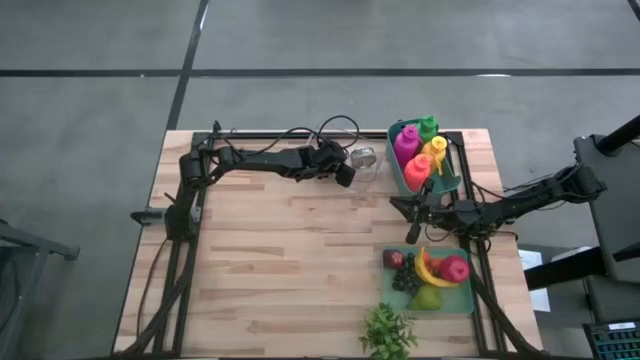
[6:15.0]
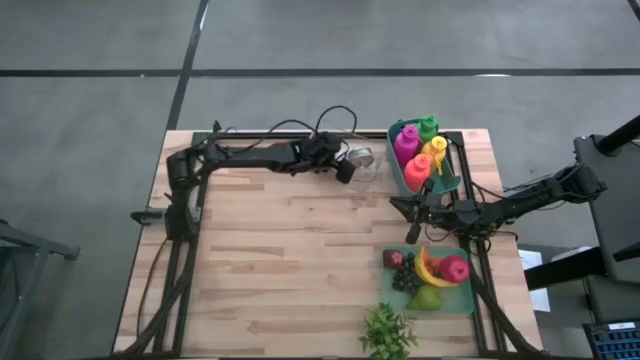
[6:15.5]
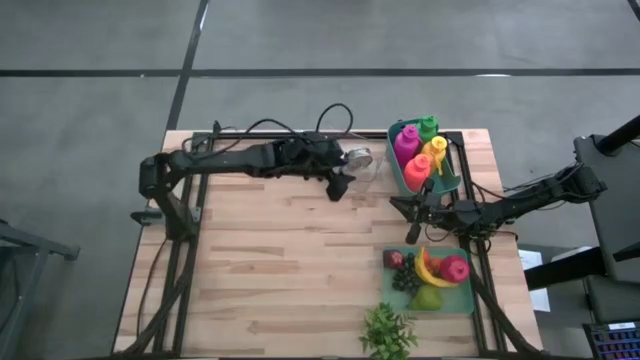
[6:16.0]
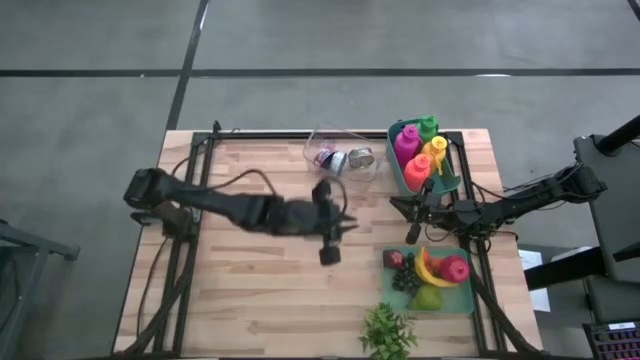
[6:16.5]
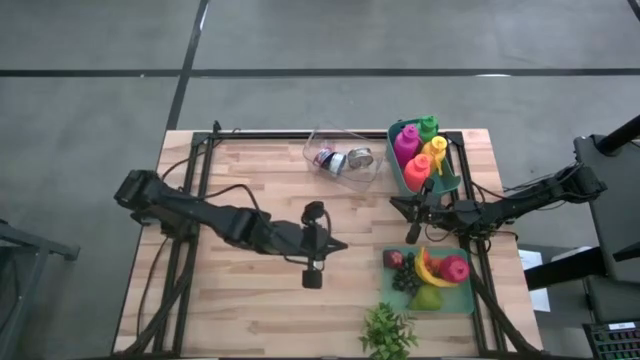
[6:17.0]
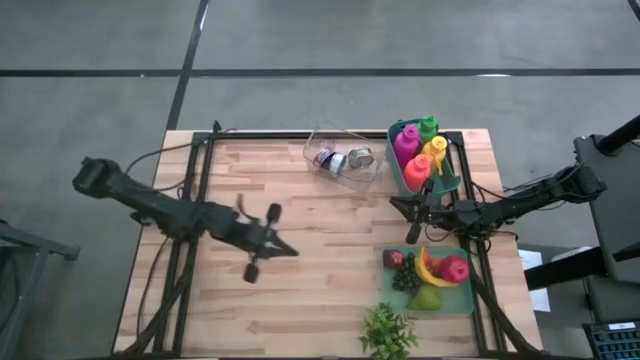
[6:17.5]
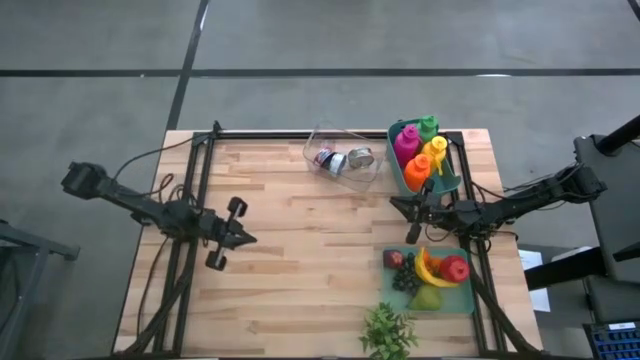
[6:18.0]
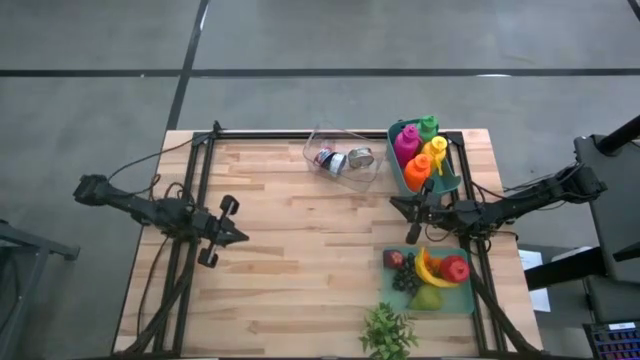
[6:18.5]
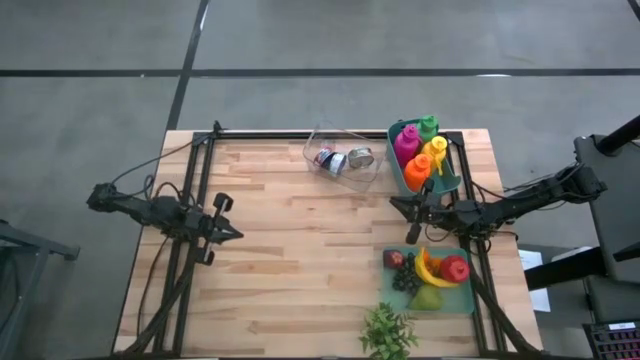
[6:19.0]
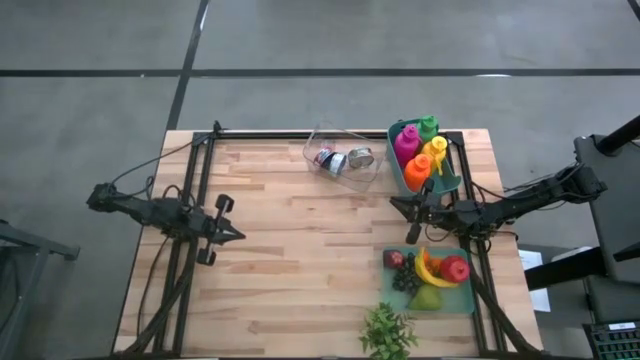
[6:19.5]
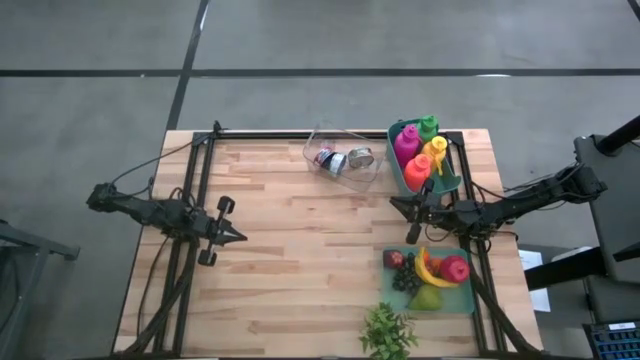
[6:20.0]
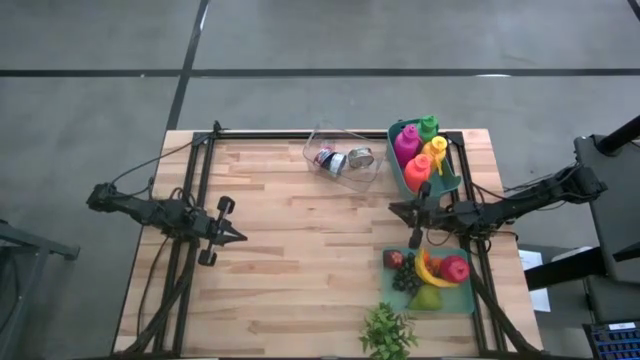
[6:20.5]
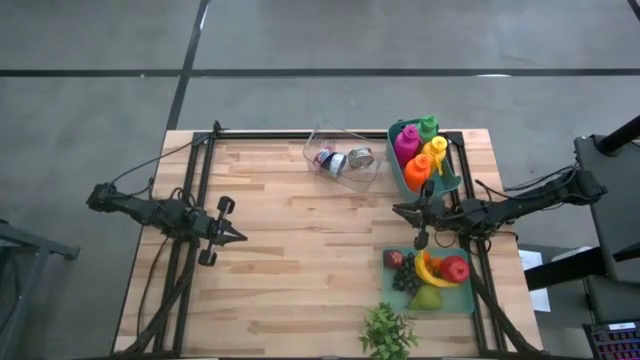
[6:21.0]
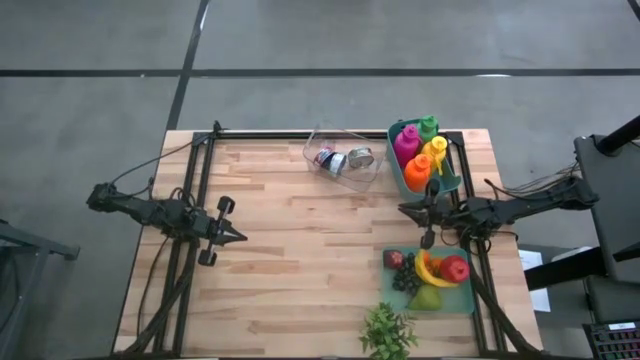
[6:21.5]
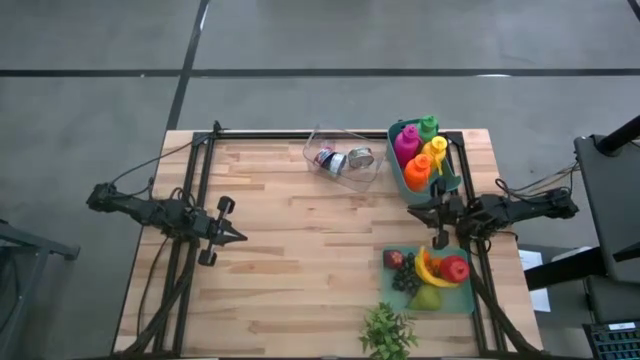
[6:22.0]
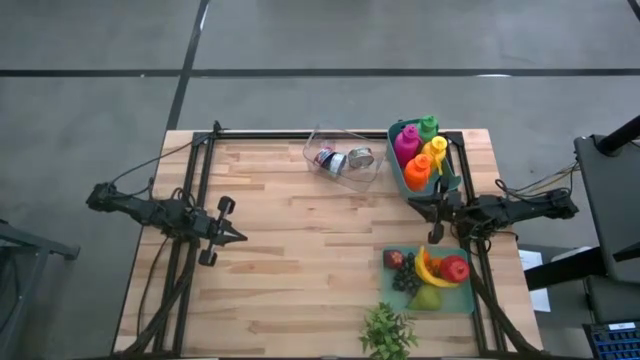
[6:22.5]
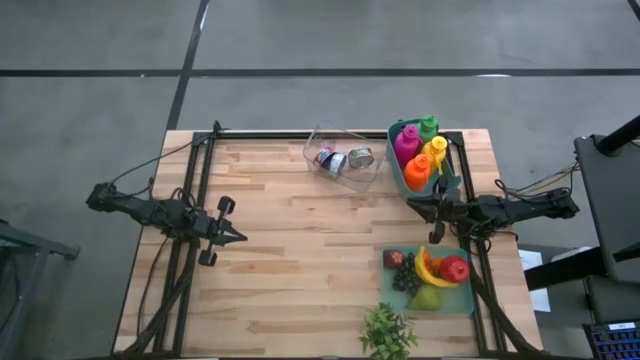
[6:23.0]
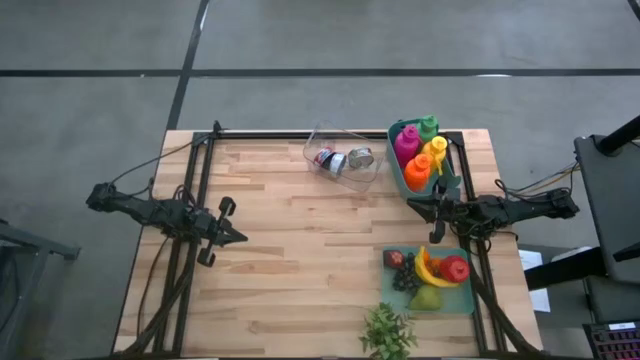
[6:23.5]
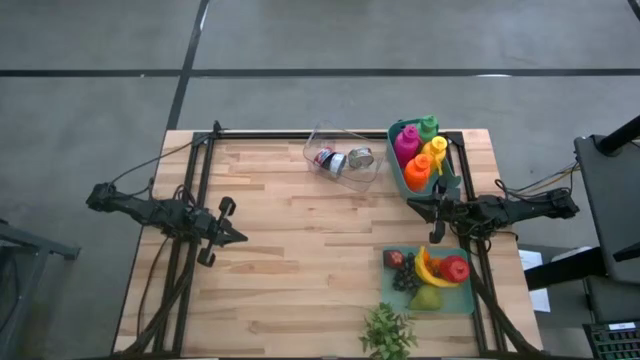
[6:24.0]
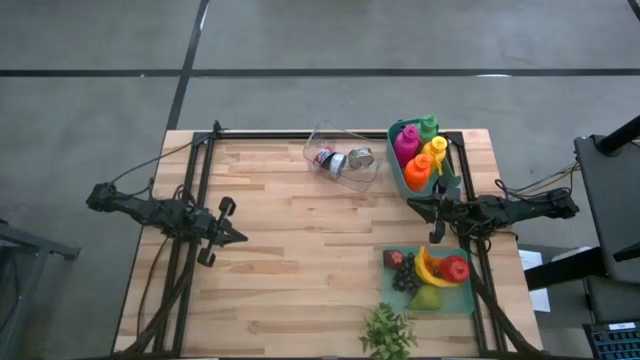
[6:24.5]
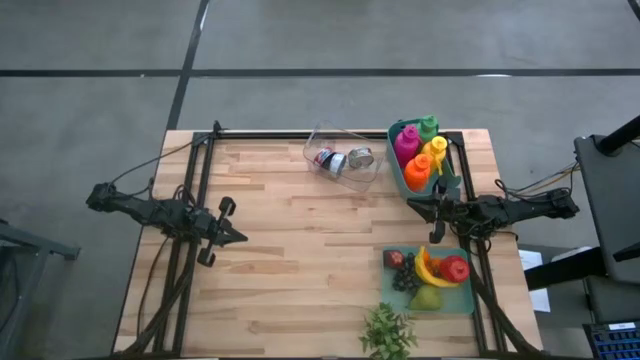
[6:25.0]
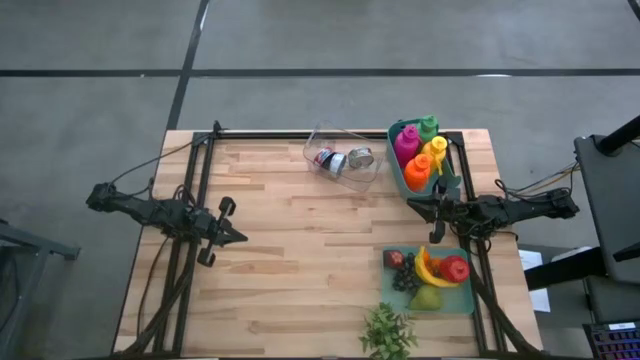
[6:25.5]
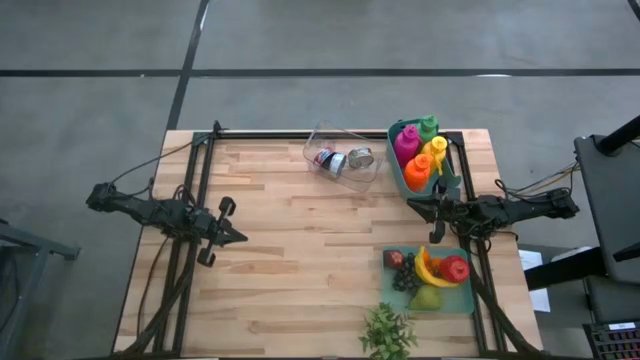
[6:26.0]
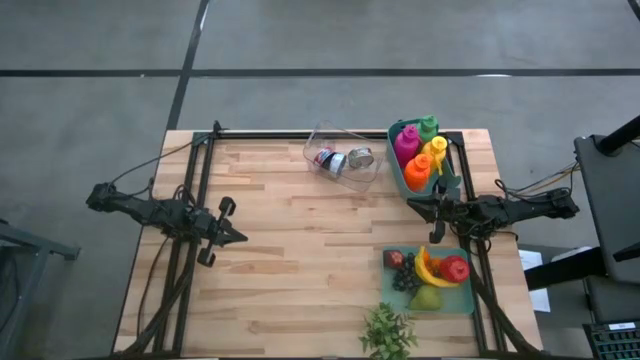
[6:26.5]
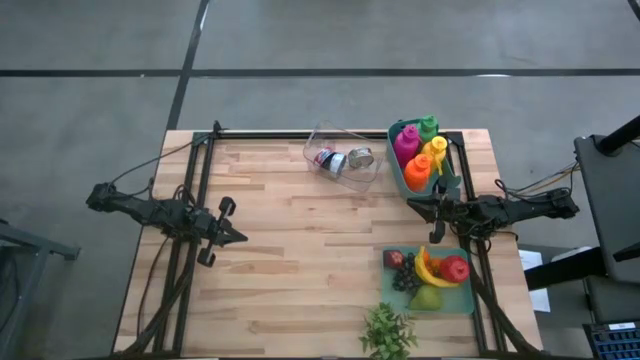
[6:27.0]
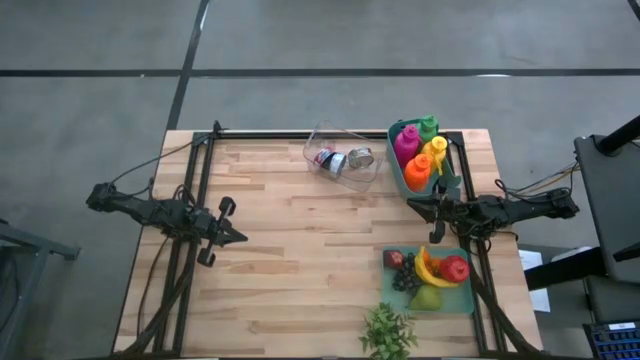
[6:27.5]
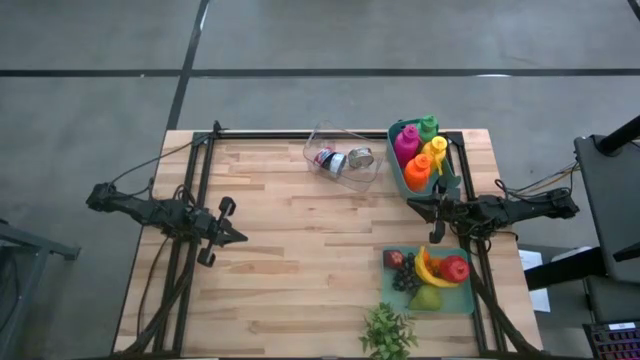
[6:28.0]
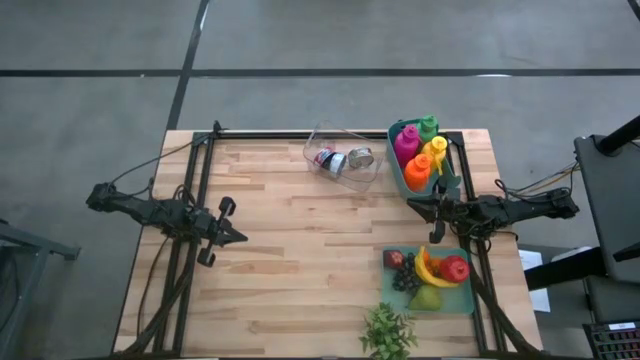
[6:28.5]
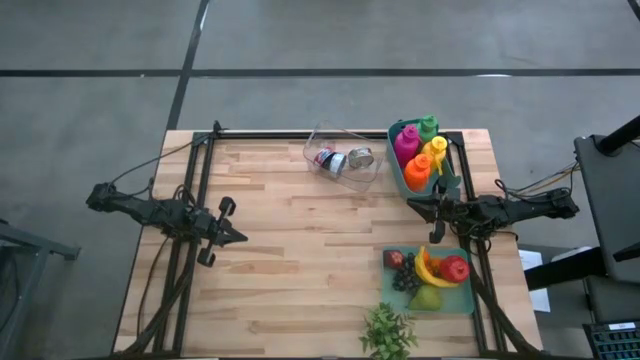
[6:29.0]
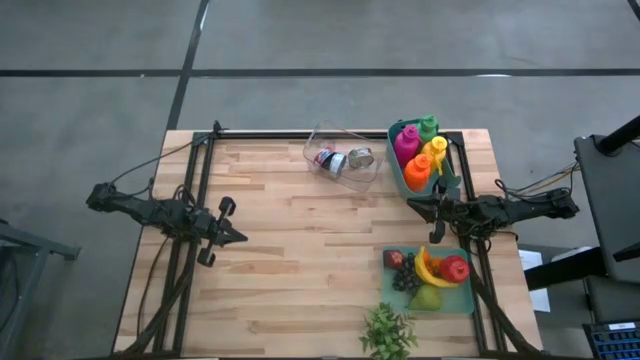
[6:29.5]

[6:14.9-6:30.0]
Task: Pick & Place Food Item
Return to Home Position

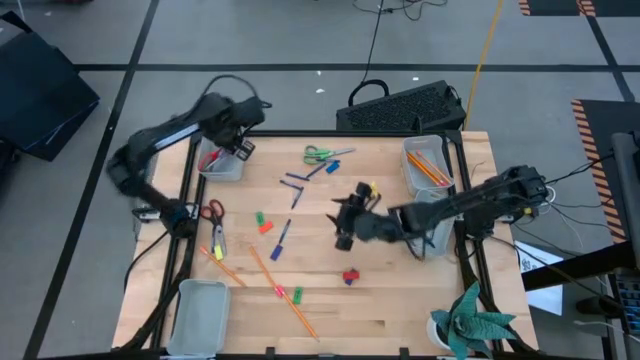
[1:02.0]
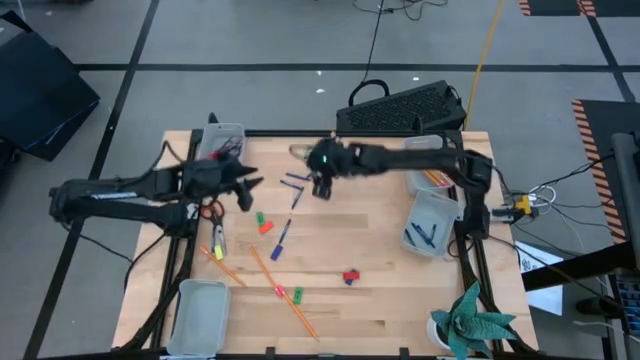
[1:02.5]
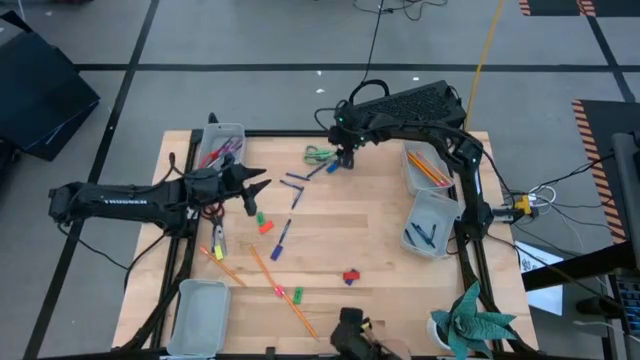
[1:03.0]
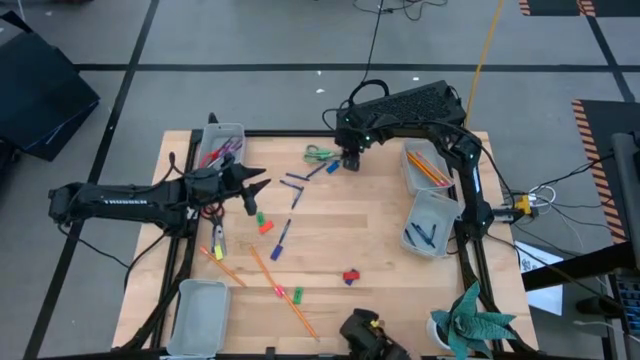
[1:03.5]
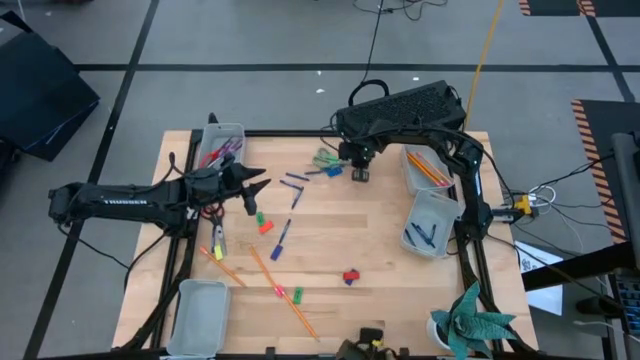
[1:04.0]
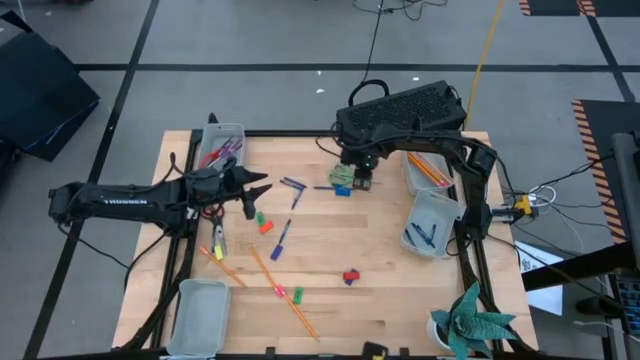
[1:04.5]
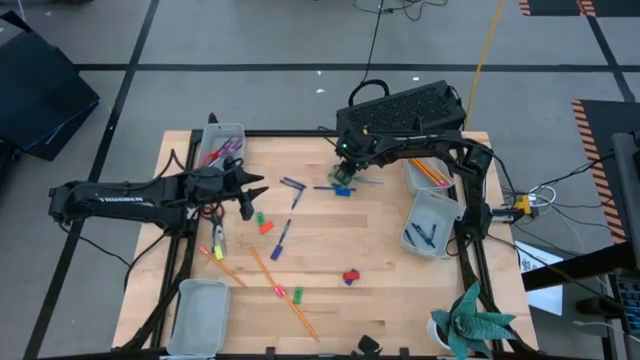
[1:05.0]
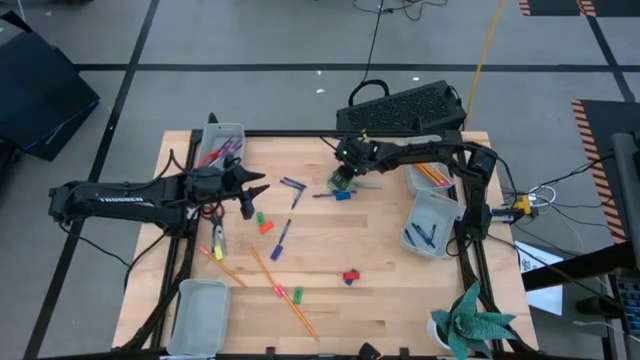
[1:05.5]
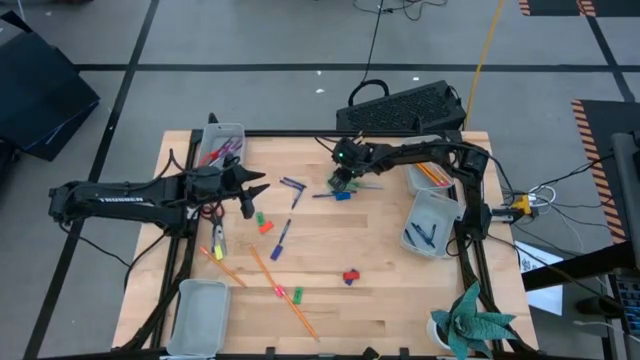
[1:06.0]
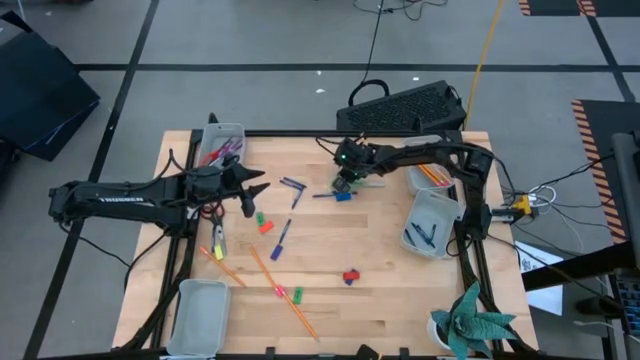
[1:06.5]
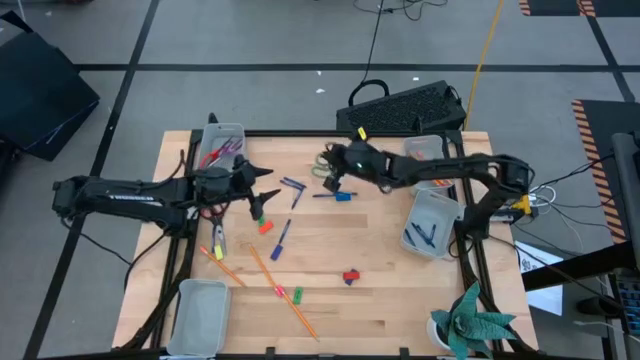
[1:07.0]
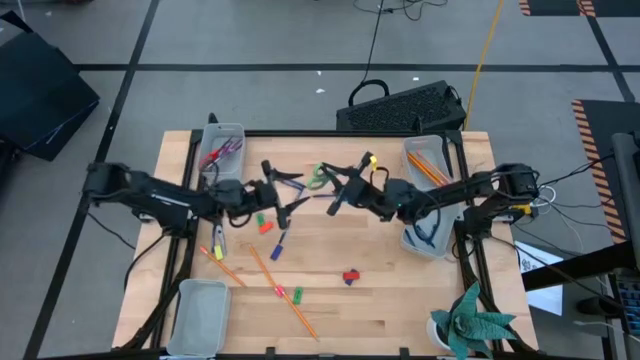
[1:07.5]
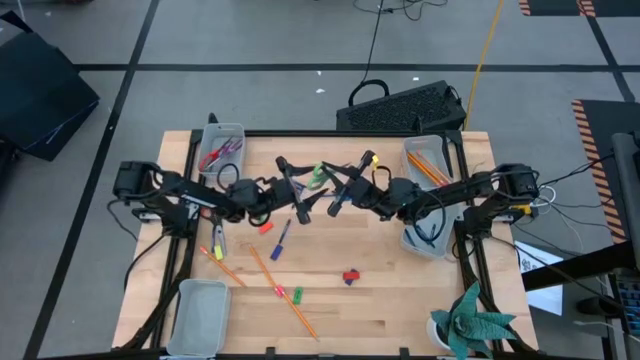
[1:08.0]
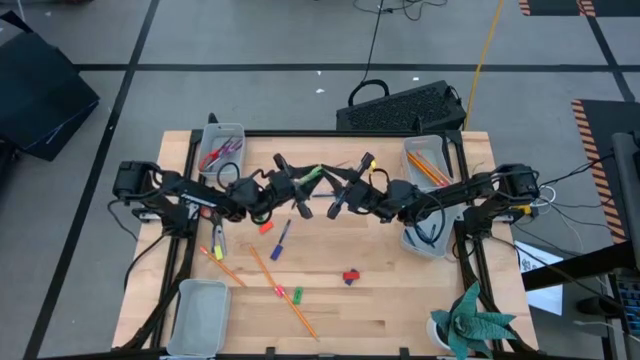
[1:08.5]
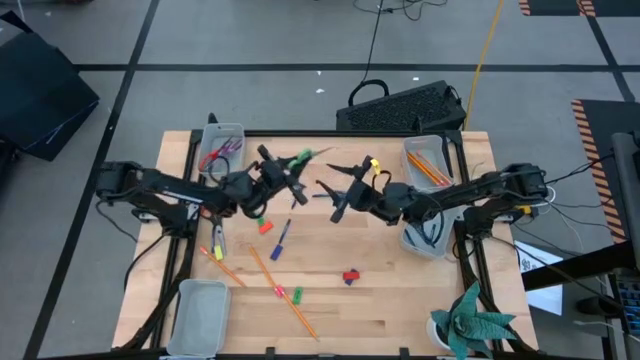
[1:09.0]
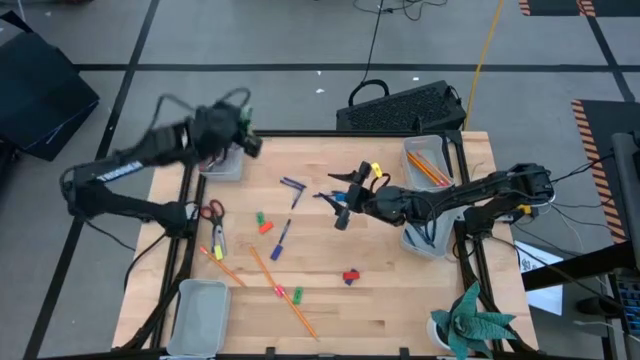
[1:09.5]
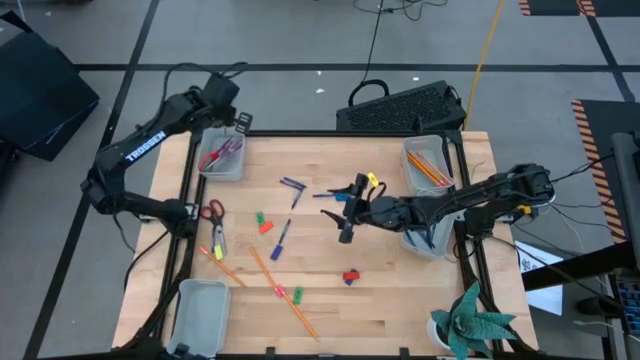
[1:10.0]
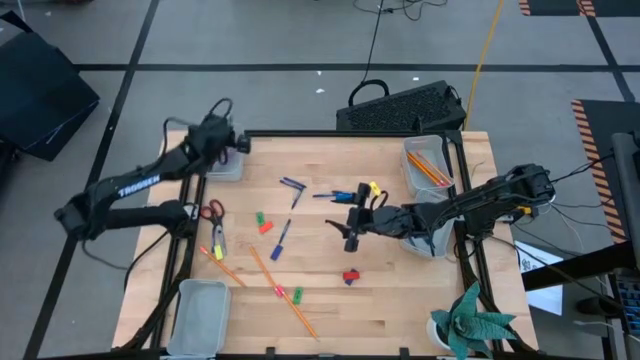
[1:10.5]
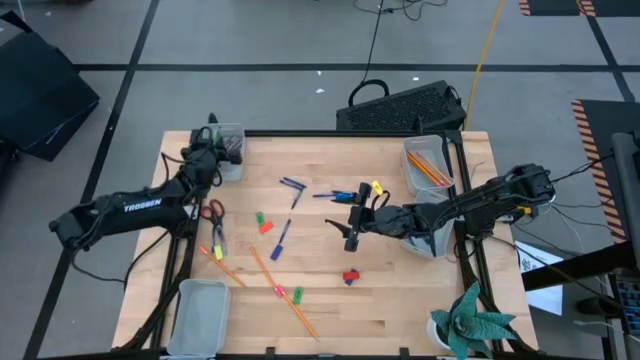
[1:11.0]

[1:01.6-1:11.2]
Task: Sort crayons/erasers/pens/pencils in bins
Put the green scissor into the top left gray bin
